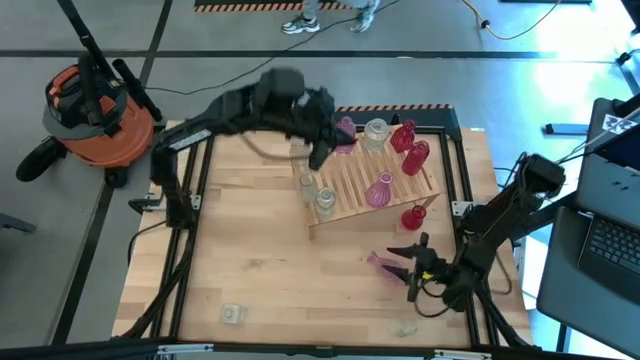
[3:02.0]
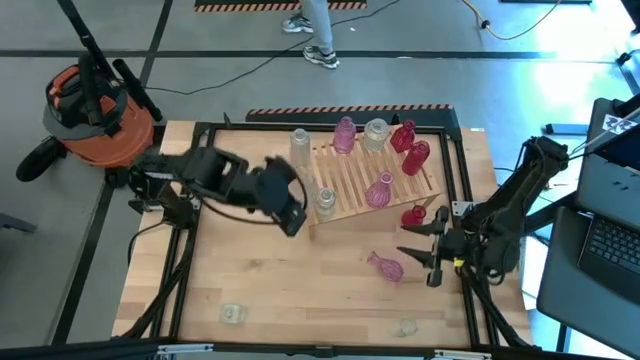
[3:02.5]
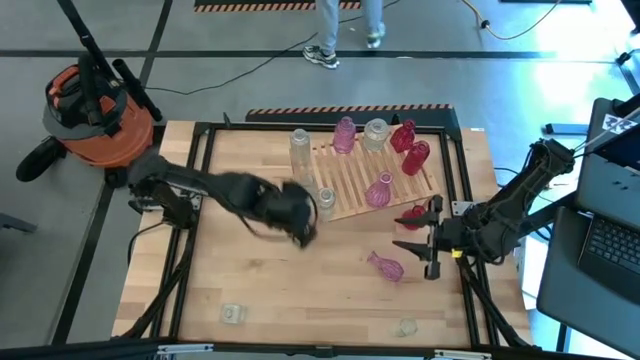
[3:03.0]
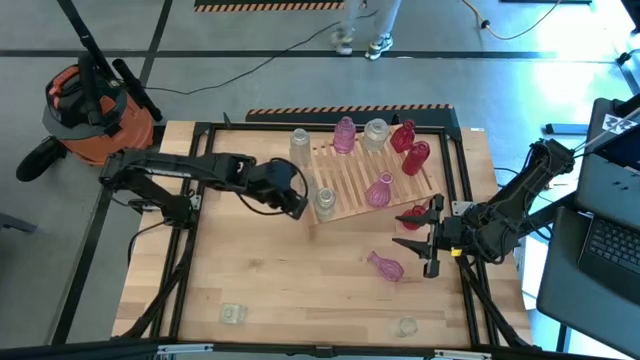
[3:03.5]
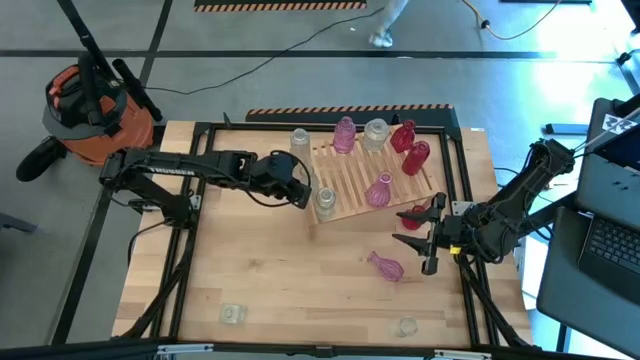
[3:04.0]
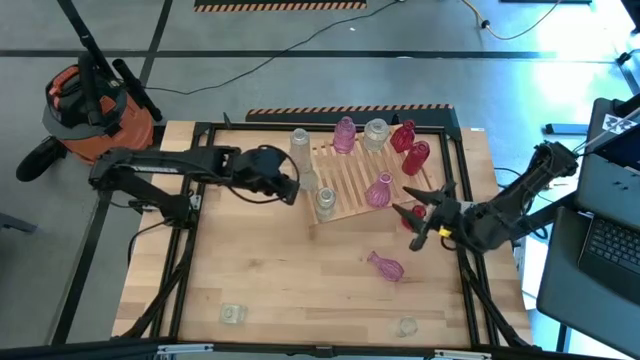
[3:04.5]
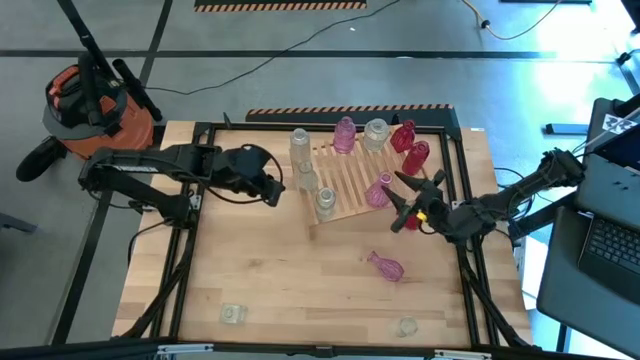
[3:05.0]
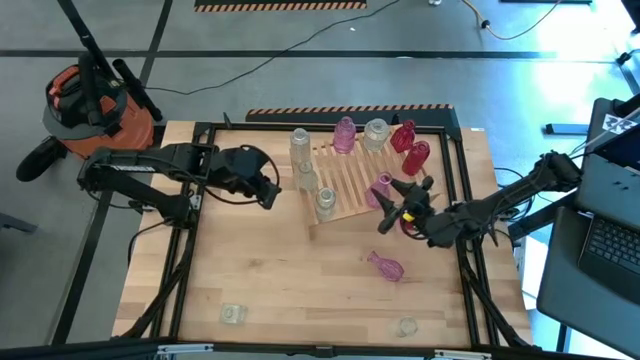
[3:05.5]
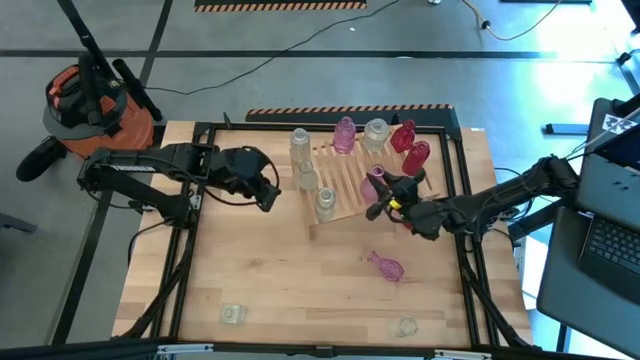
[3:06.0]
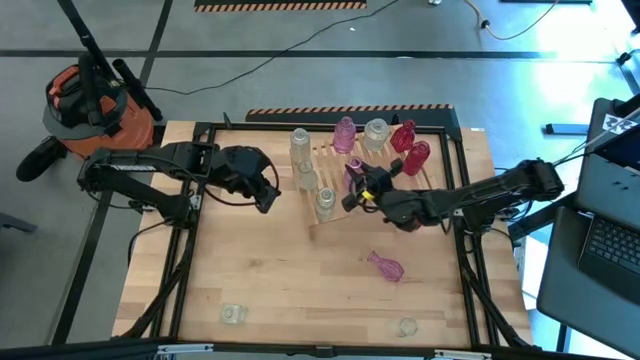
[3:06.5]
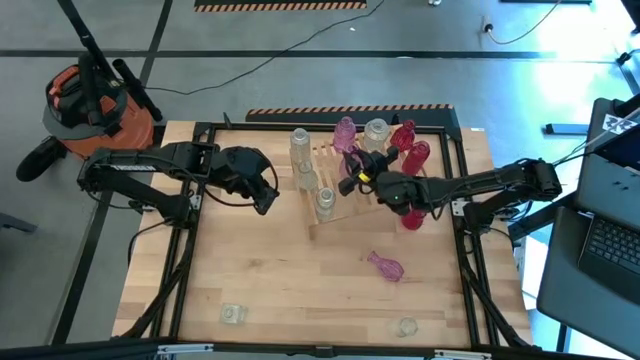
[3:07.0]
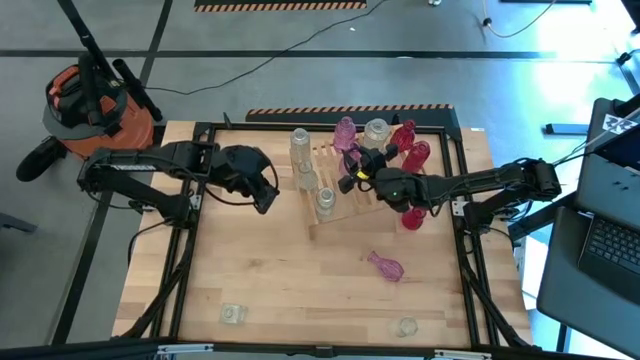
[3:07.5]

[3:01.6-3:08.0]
Task: sort vases onto shelf
Adjust the pink vase on the shelf

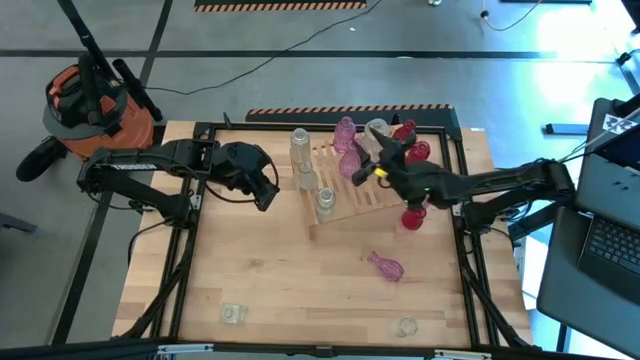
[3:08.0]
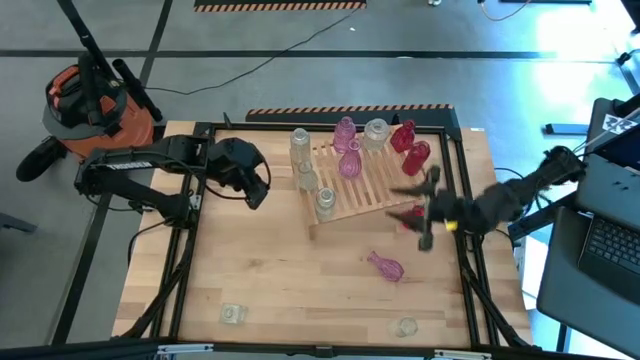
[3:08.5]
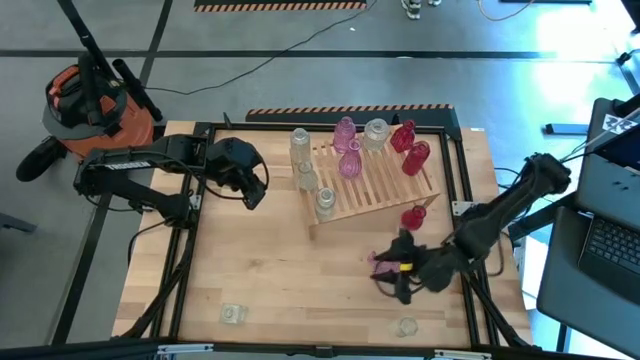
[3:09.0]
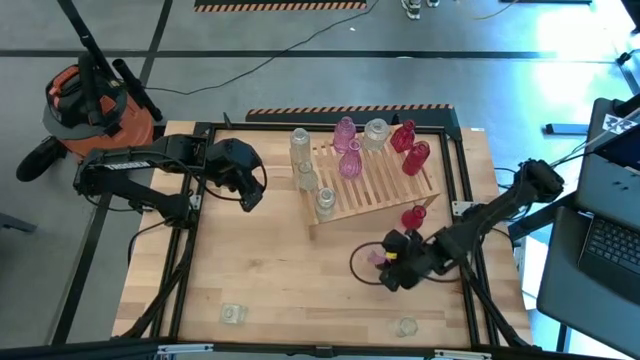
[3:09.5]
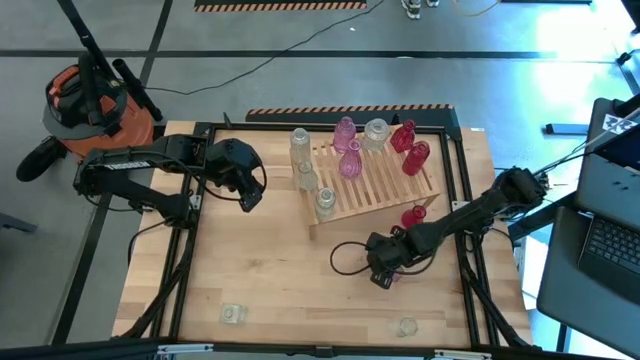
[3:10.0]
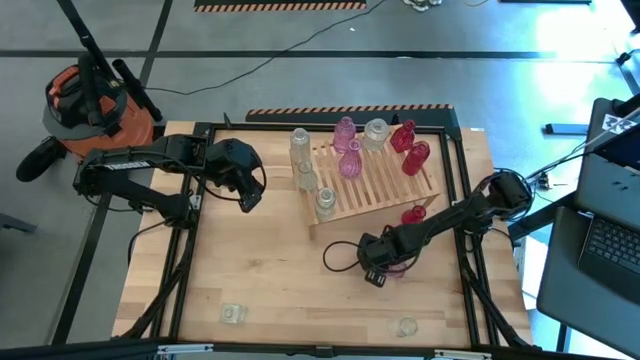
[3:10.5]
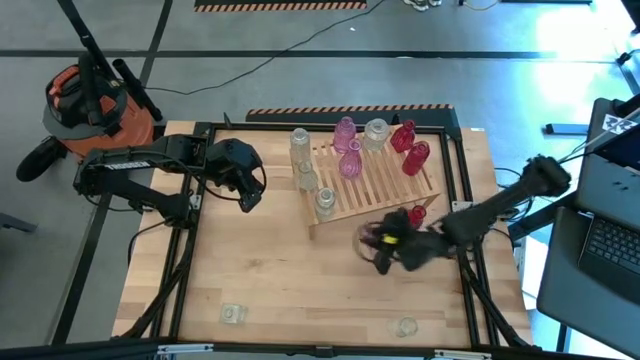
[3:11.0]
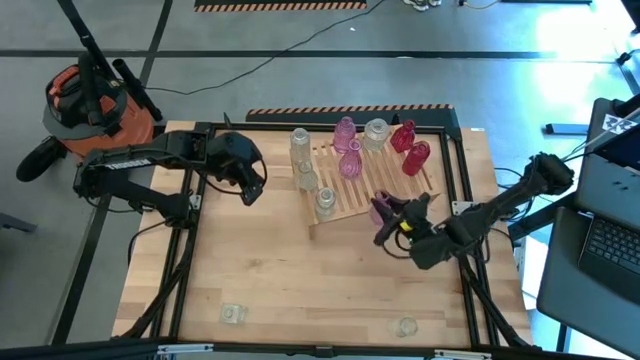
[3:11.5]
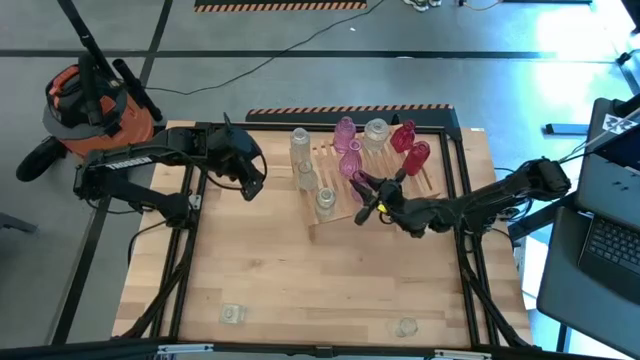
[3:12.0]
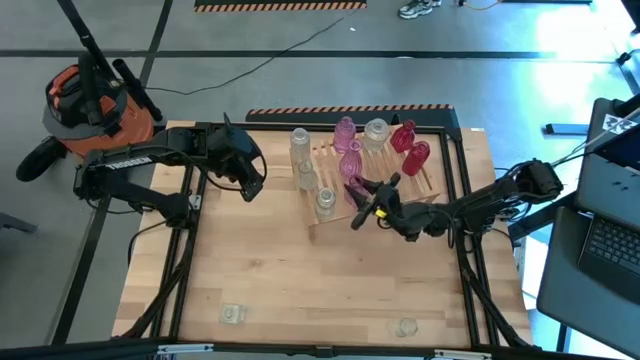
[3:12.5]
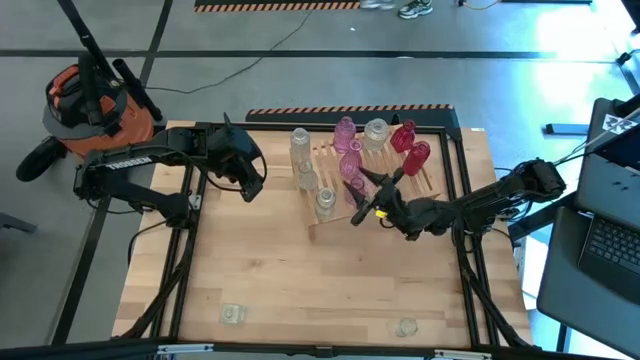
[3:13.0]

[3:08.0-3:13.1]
Put the pink vase on the shelf aligned with the other pink vase

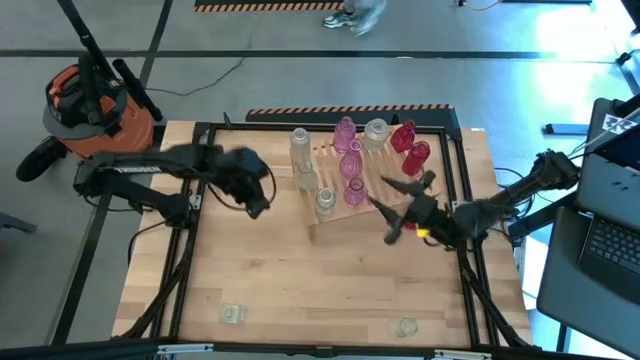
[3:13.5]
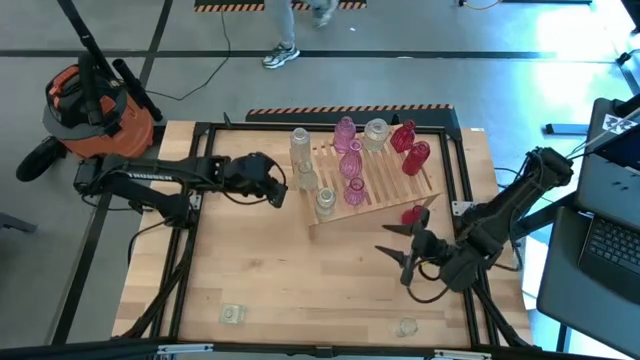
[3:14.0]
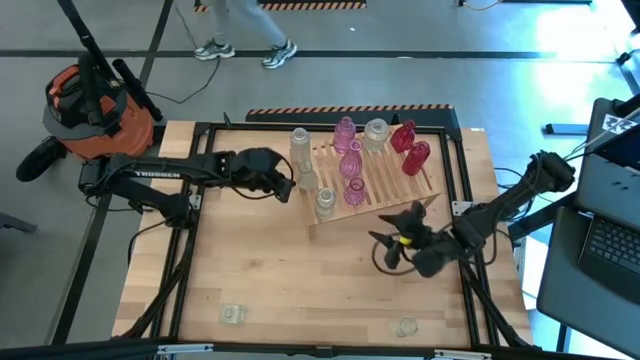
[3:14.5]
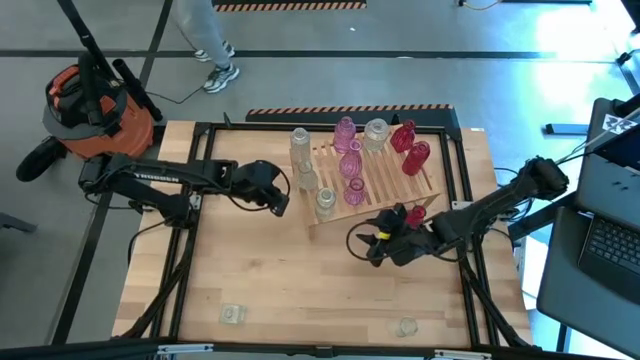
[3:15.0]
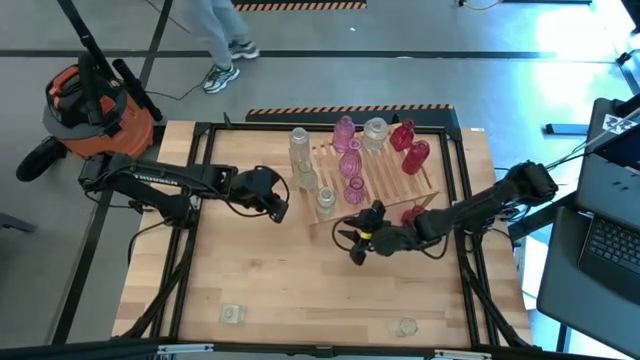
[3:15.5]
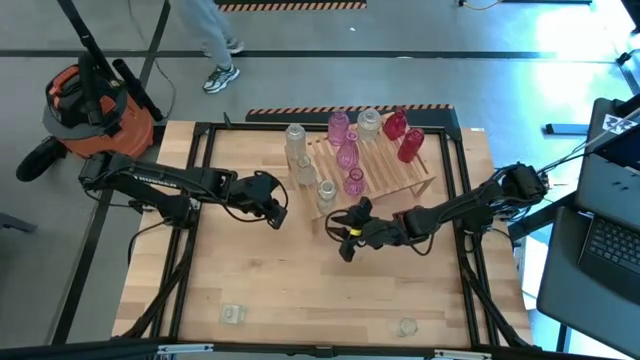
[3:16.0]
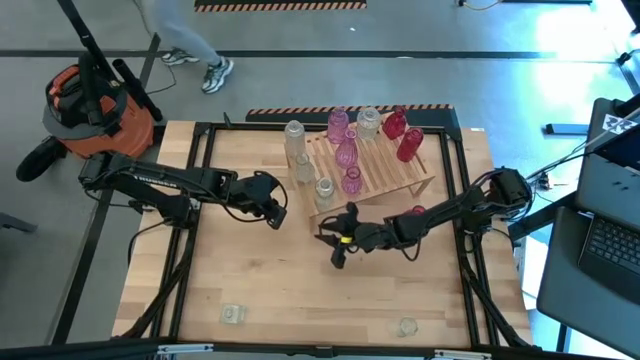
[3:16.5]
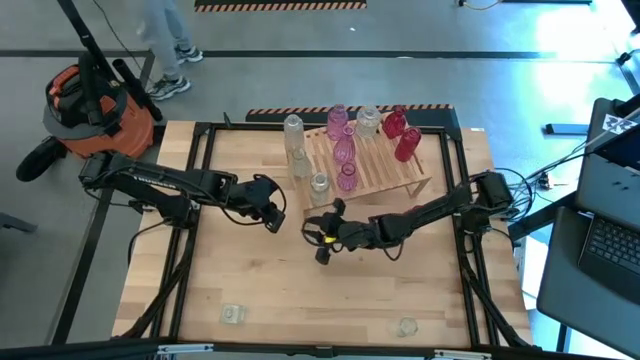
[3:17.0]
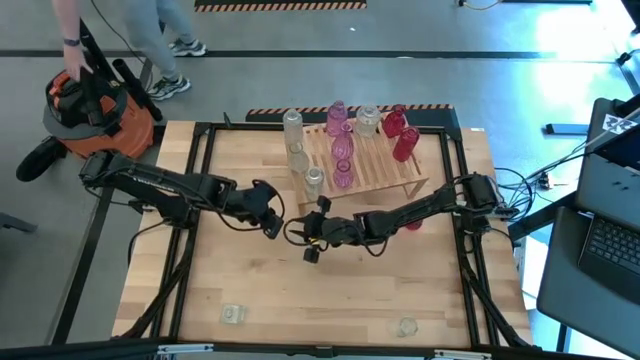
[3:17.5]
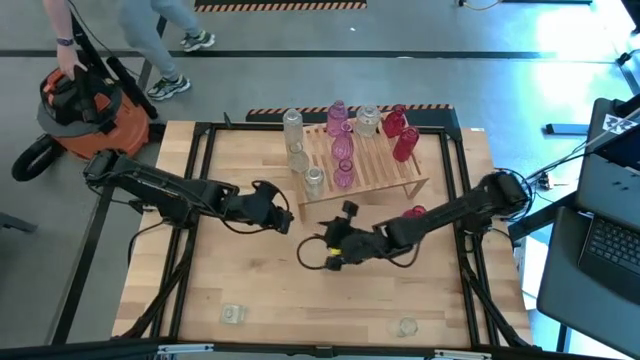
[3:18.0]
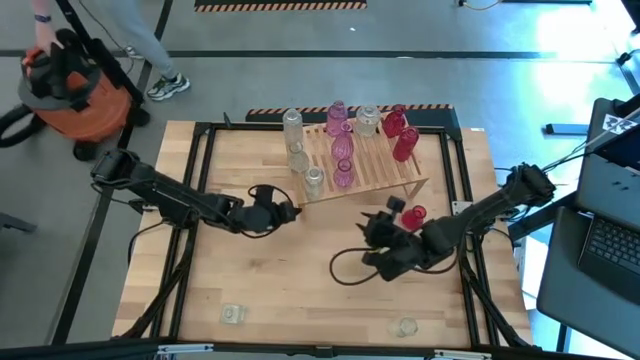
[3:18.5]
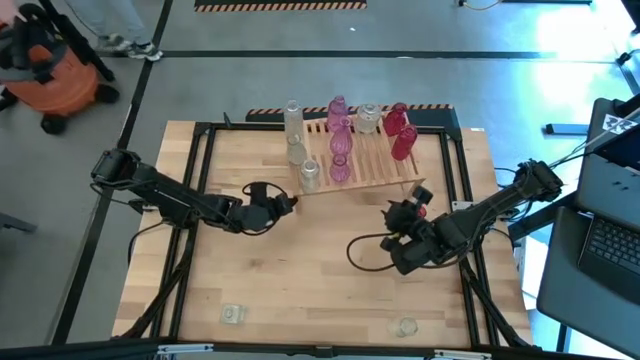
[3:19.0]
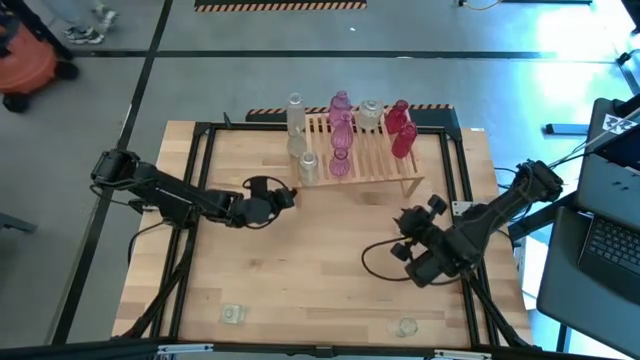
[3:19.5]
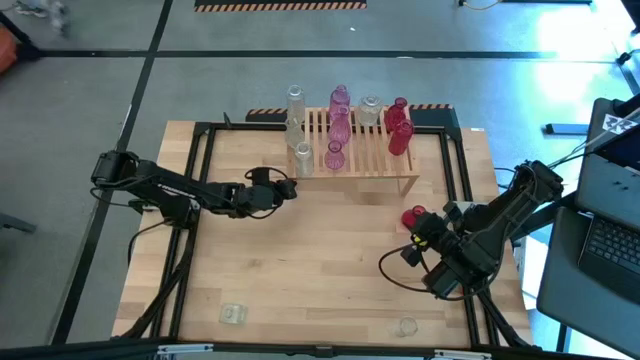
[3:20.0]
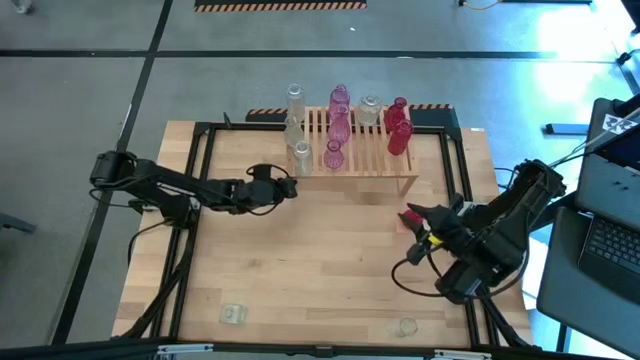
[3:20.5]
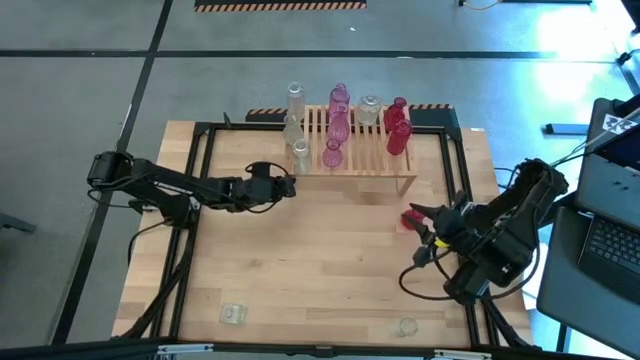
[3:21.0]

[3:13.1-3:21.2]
Adjust the shelf on the top of the table

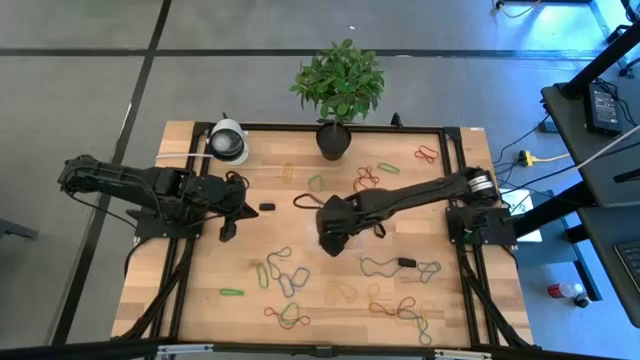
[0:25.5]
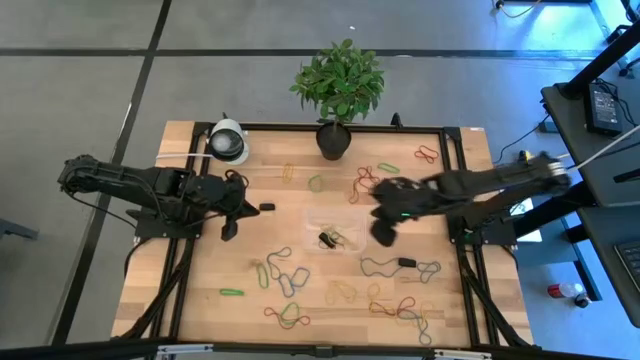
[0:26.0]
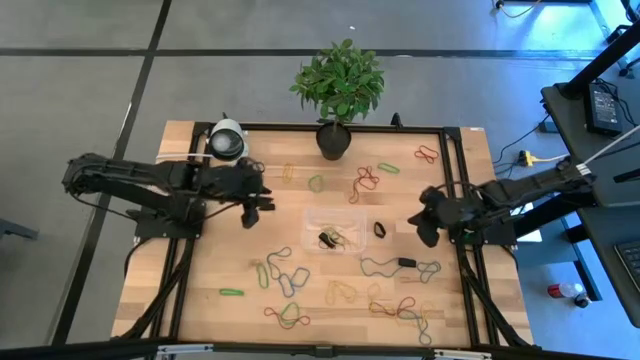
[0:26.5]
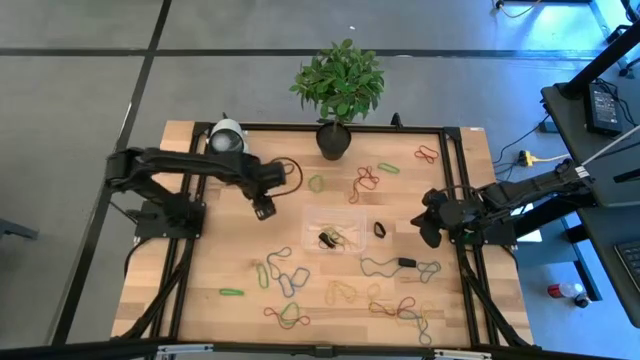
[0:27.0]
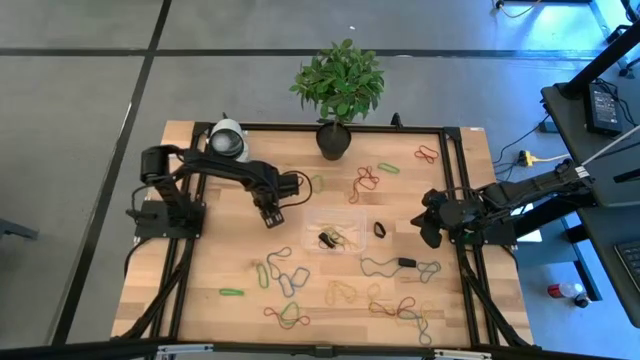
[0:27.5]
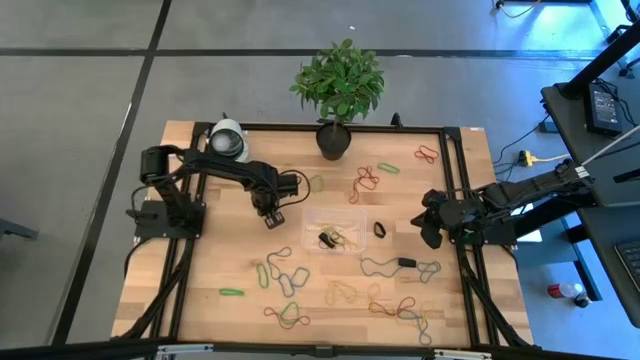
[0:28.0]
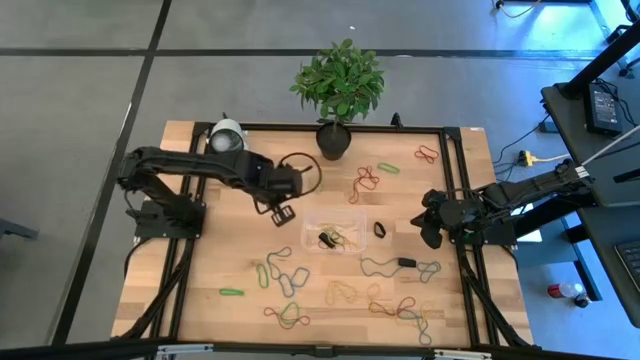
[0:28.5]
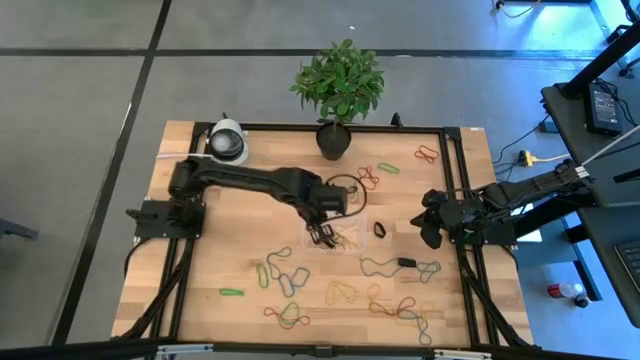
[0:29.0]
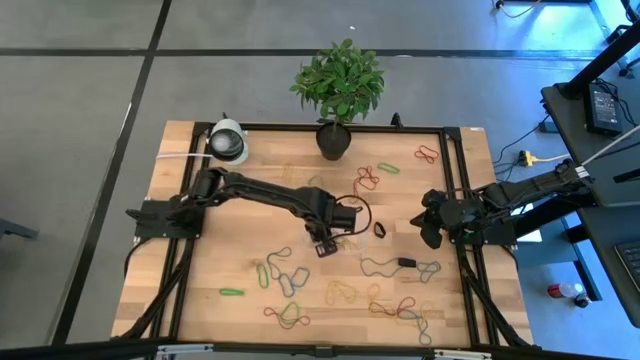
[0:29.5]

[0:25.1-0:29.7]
Task: Pick and place rubber bands into bin
Put the black rubber band into the bin
